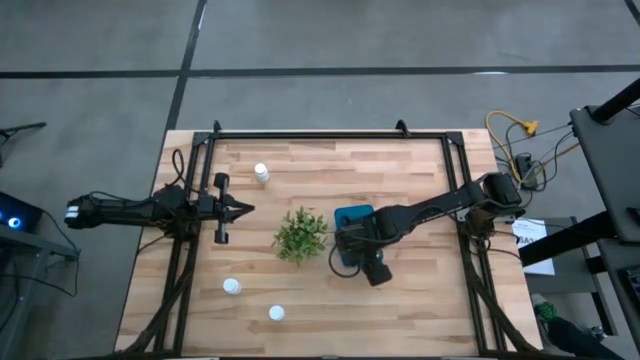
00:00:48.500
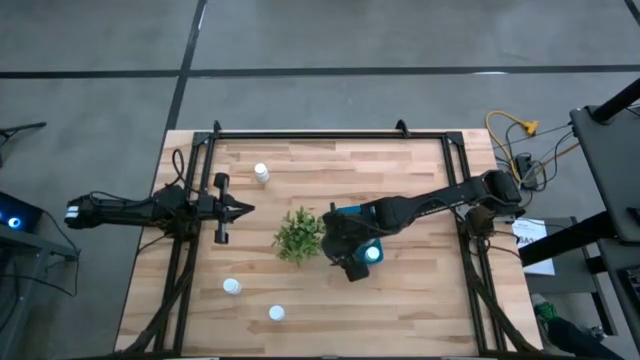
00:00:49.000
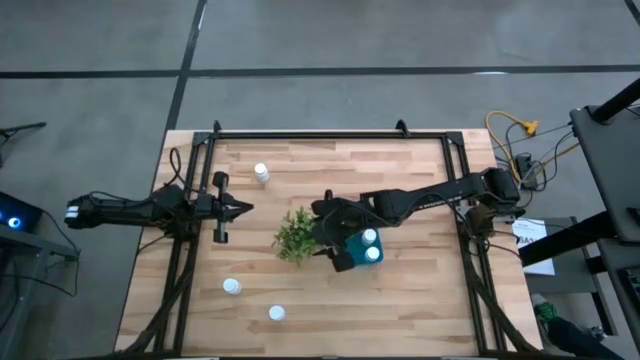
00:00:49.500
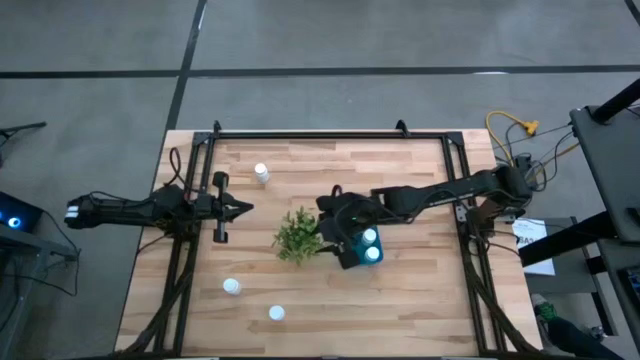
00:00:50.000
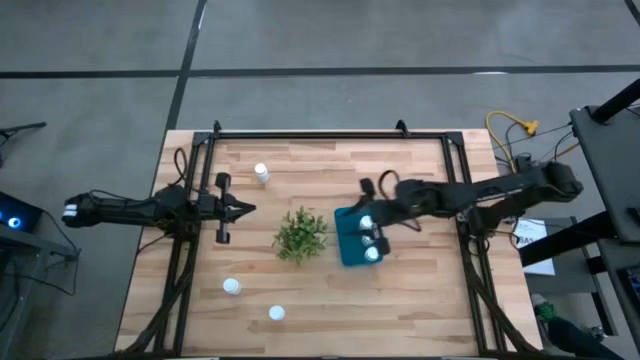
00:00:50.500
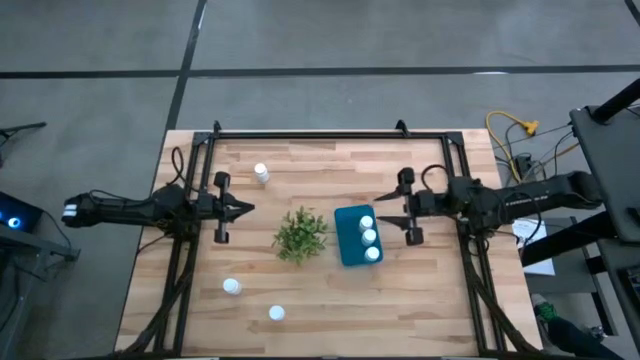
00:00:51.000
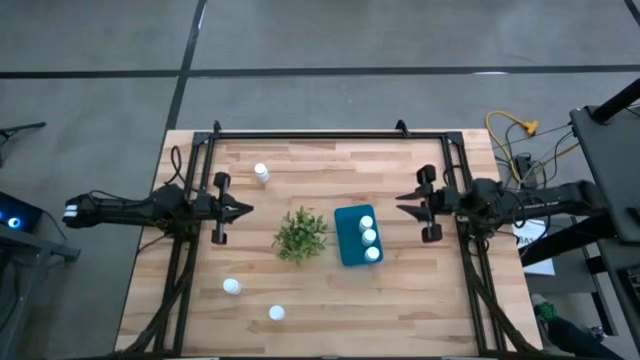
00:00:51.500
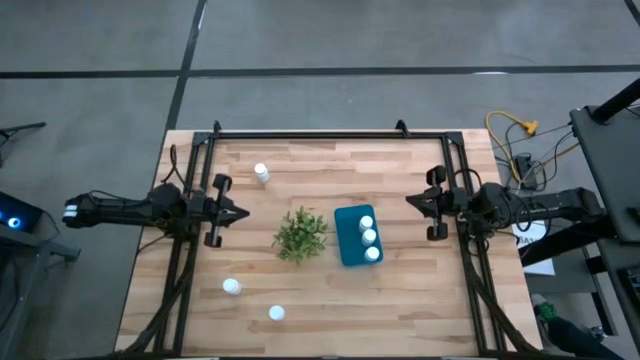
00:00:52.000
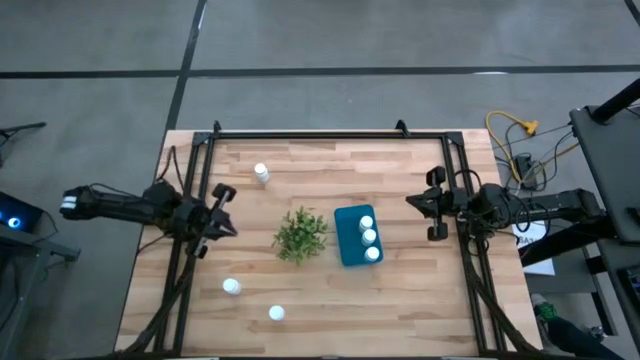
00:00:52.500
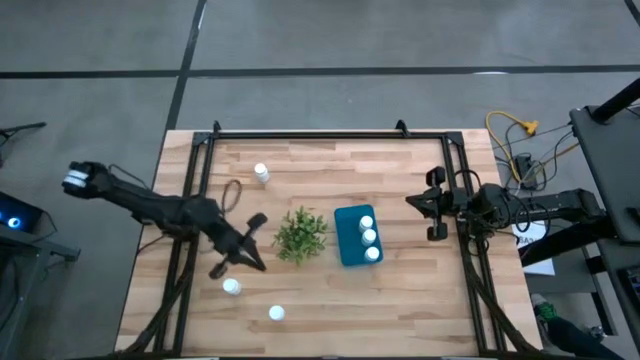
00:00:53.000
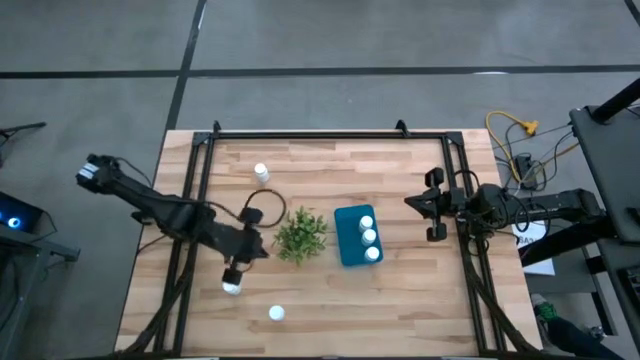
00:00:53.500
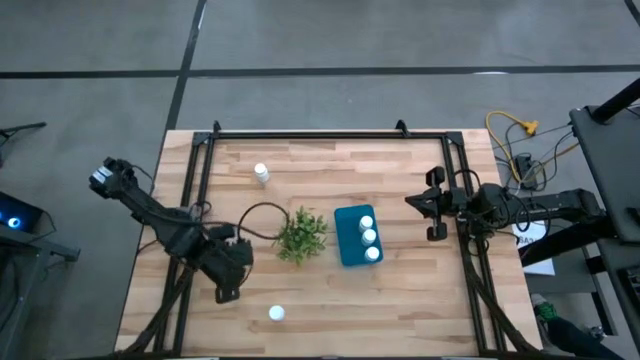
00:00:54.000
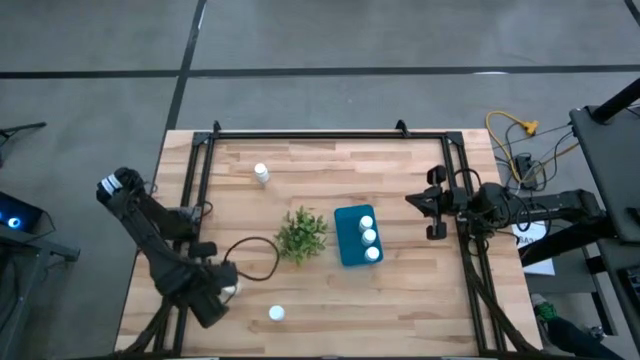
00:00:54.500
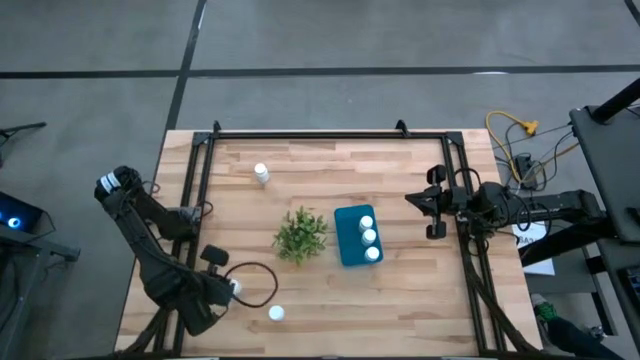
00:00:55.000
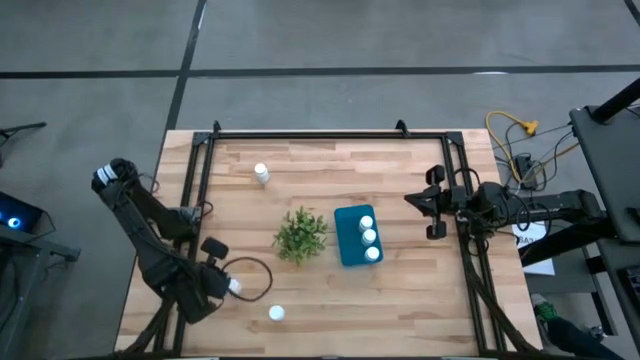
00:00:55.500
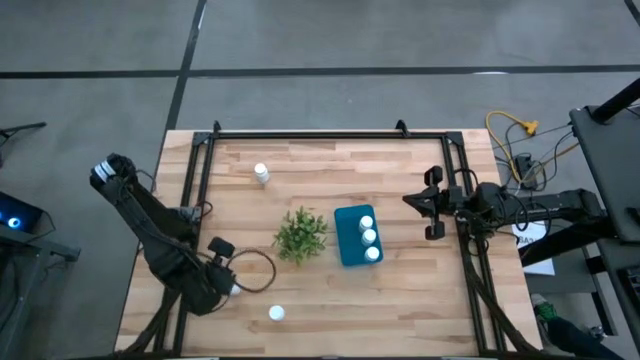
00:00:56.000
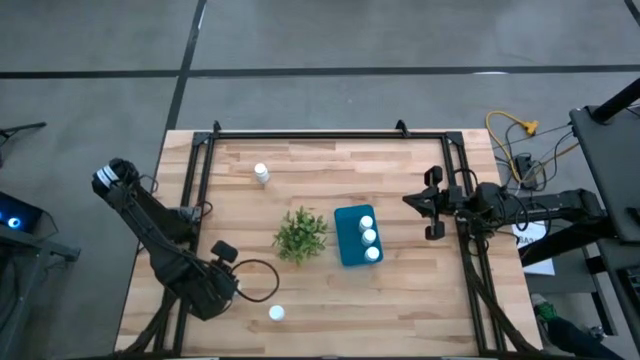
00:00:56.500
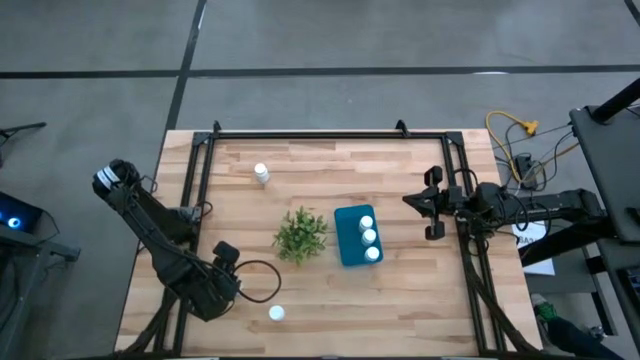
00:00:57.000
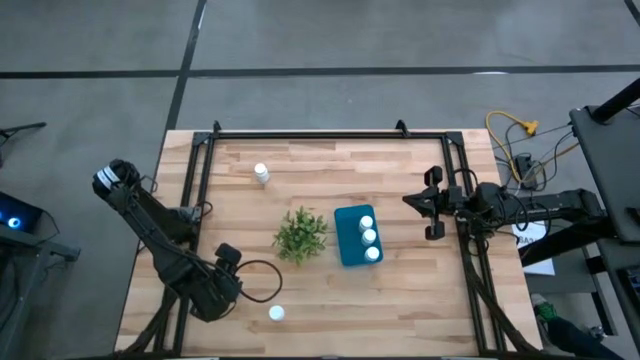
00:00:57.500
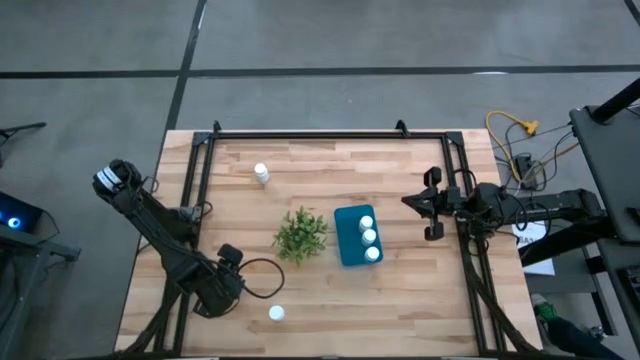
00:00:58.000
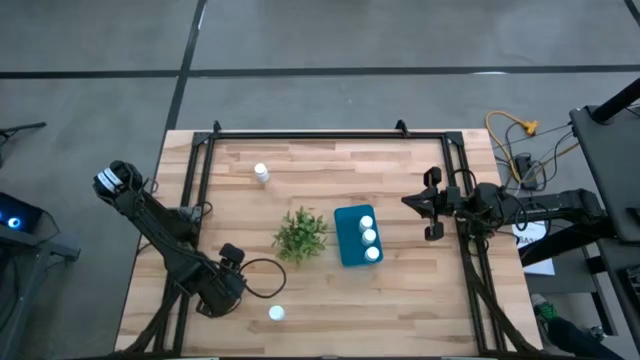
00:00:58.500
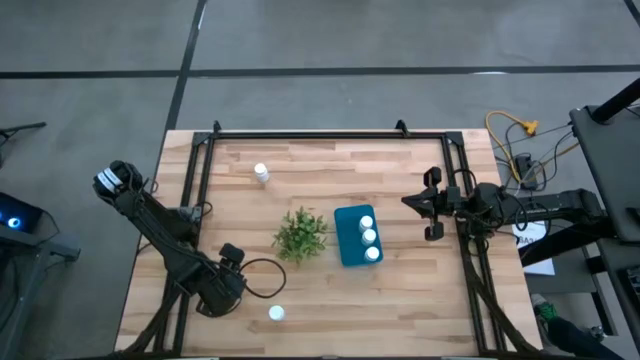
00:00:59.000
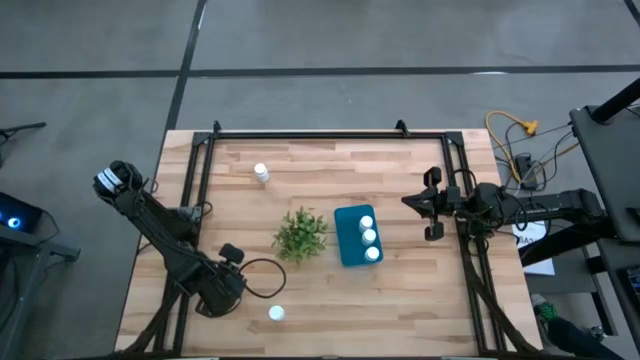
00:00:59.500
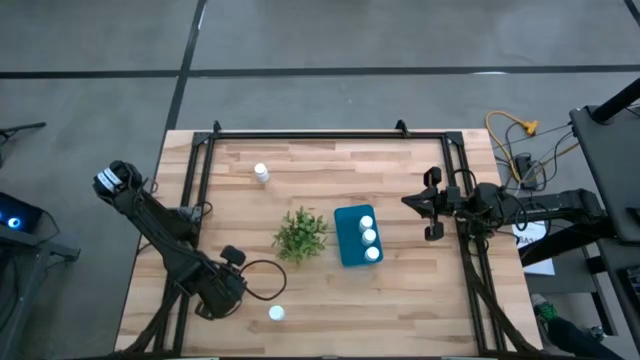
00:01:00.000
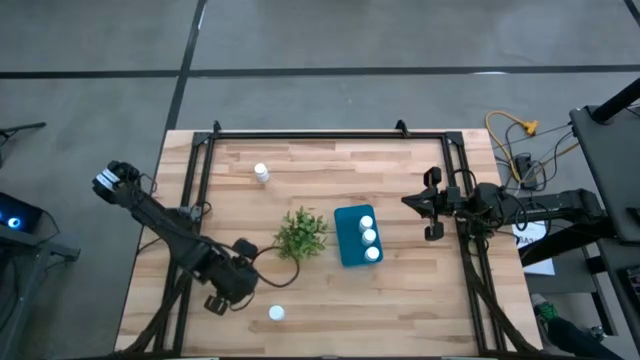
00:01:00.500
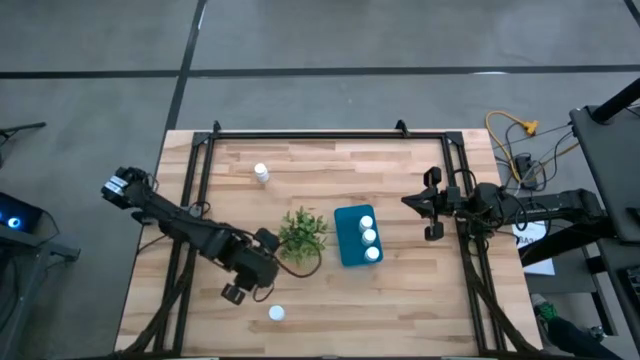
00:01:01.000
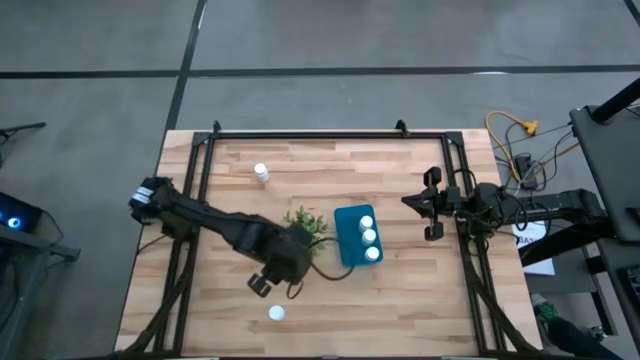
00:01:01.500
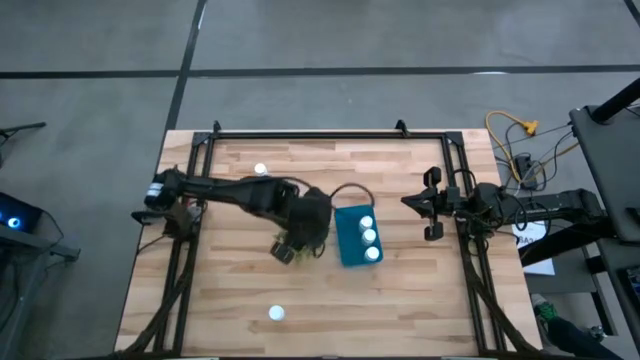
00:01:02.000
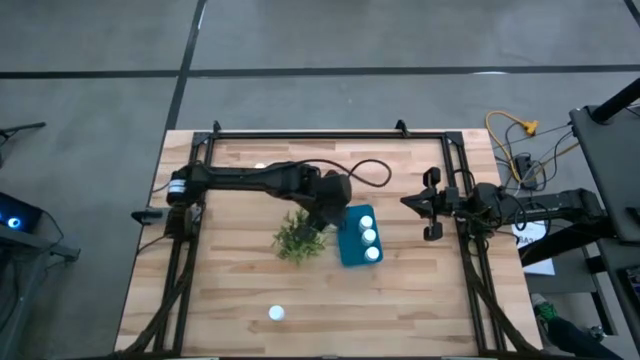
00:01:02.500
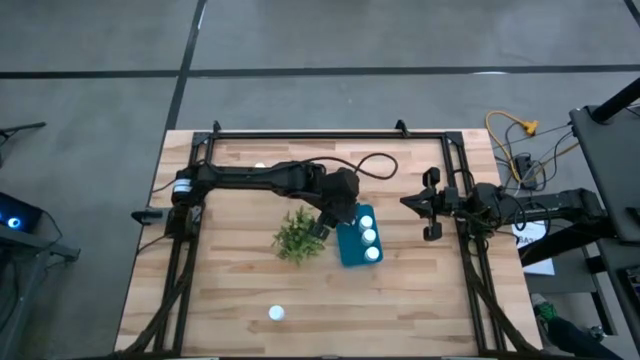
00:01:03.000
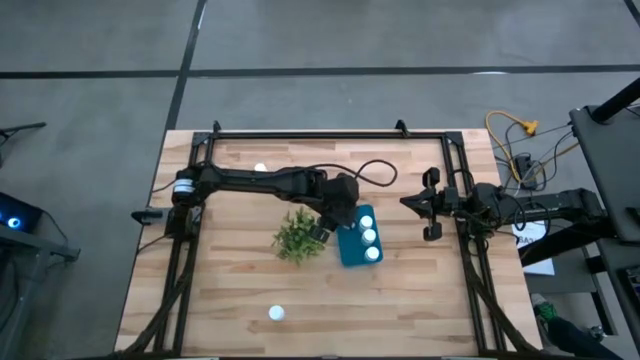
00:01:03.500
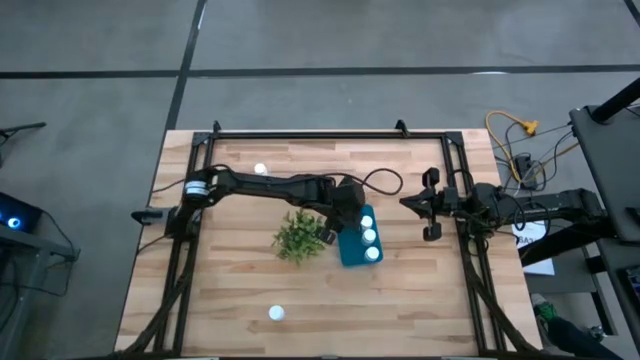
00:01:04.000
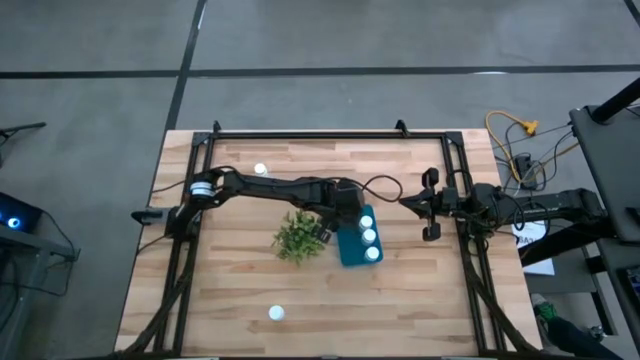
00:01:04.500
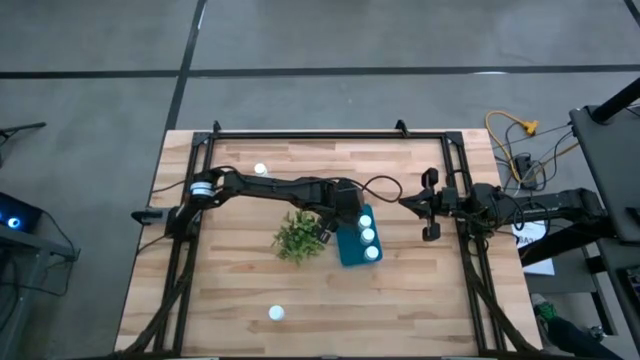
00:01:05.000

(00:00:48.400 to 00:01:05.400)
Task: Pick and place pill bottles into a basket
Put the white medicine bottle into the blue bin

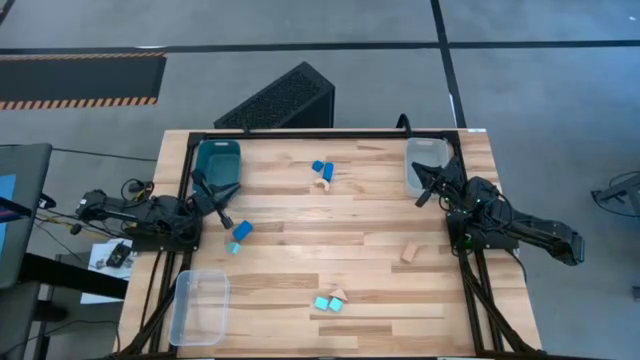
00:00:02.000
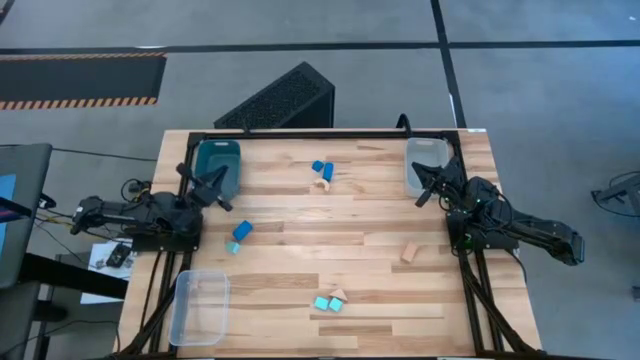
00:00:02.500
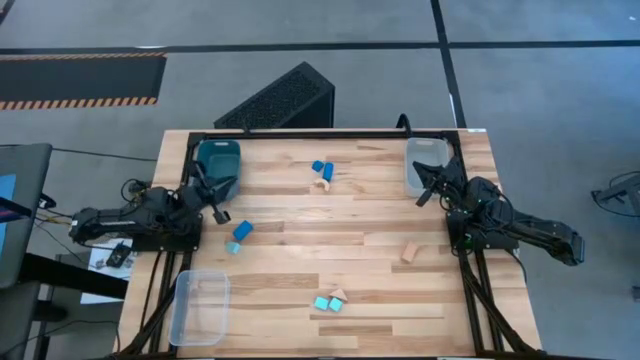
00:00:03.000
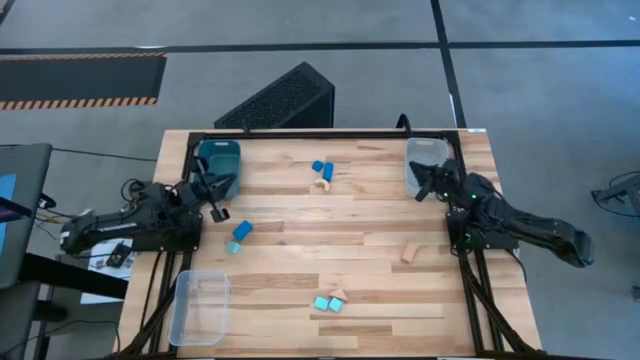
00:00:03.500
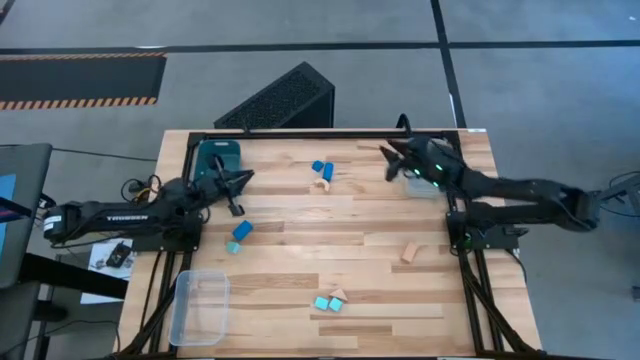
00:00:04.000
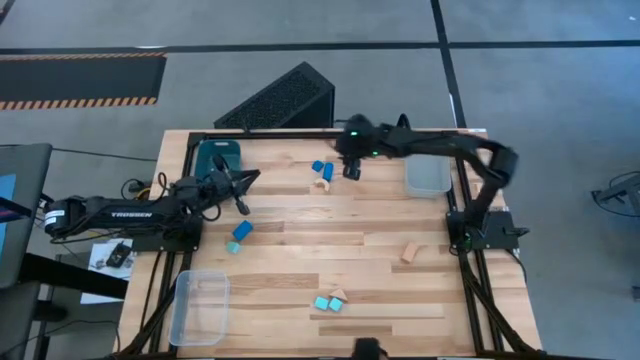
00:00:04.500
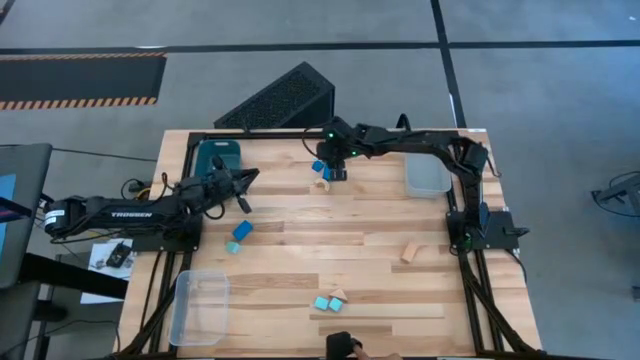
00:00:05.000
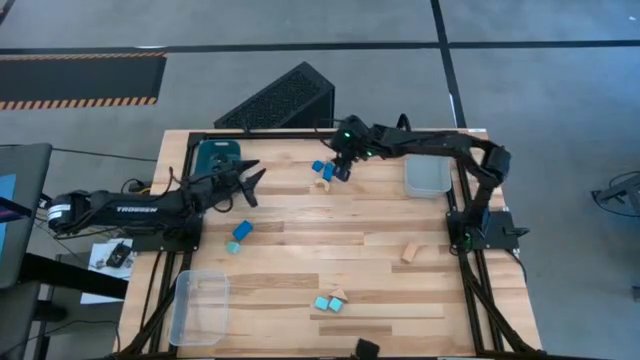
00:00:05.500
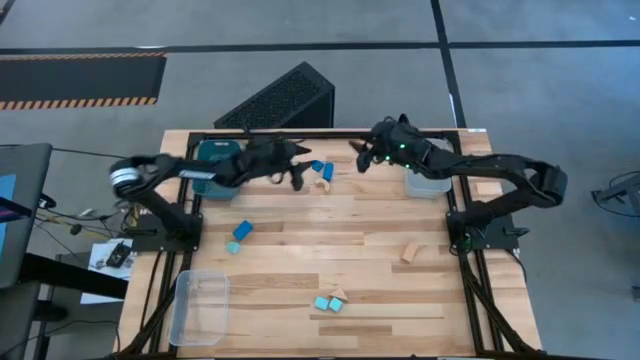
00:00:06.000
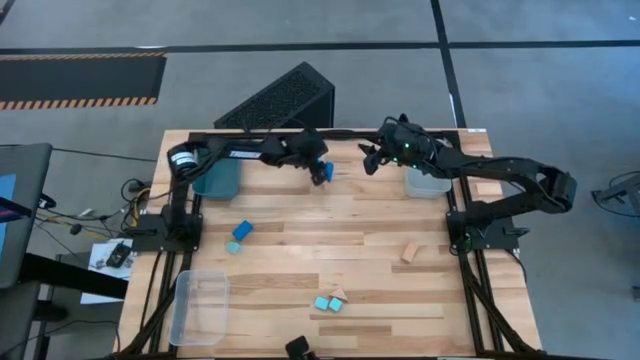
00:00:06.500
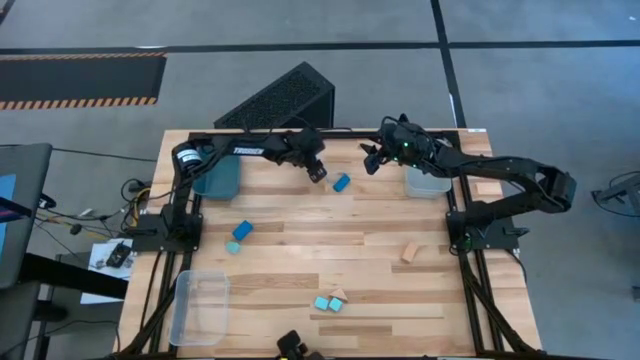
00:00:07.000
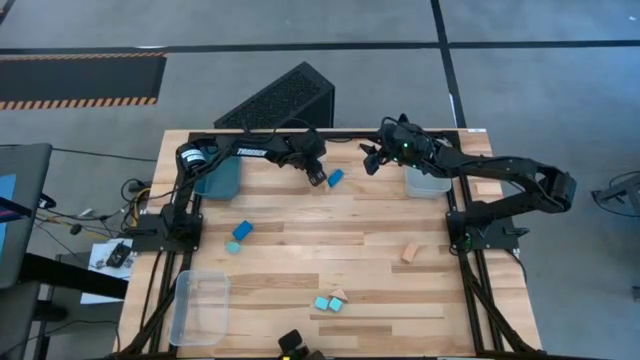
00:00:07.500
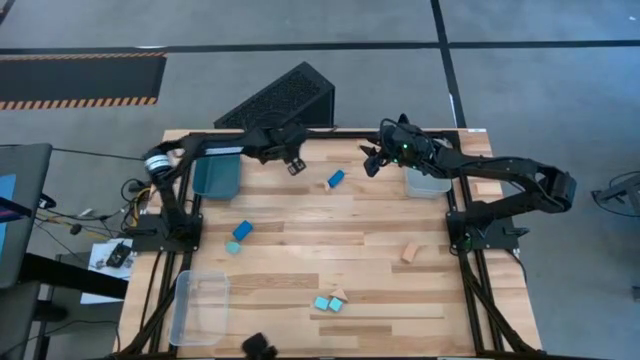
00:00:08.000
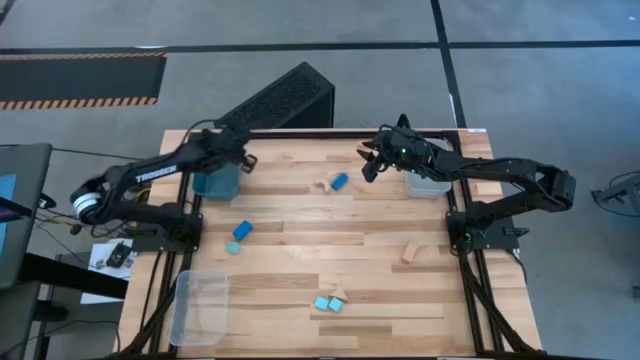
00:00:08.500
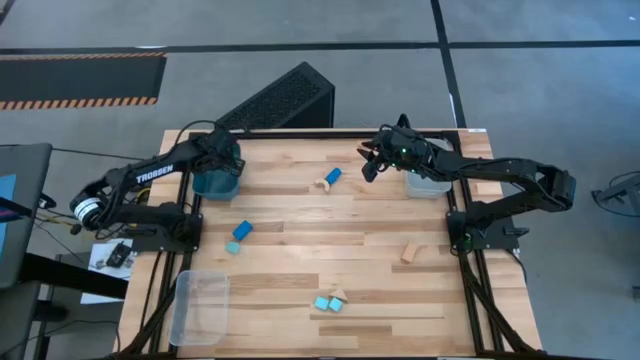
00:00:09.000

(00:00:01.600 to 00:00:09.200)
Task: Sort & place blocks by color
Put the center blue block into the blue bin
